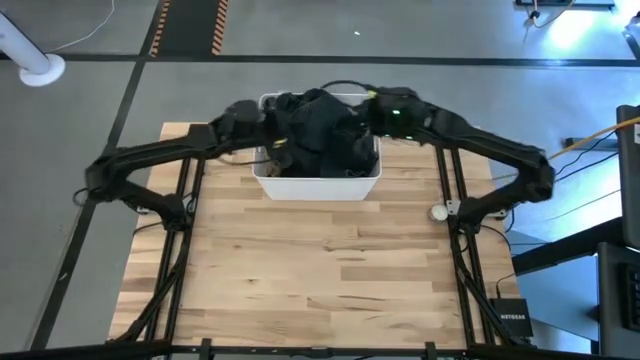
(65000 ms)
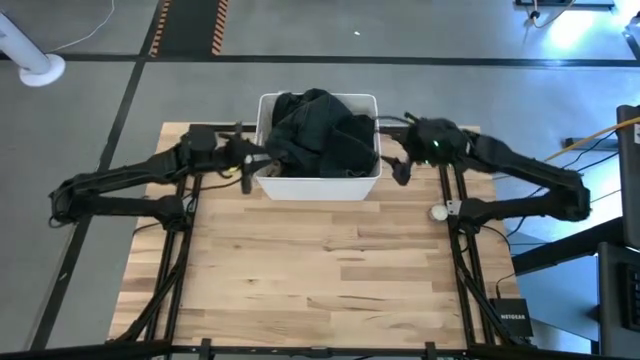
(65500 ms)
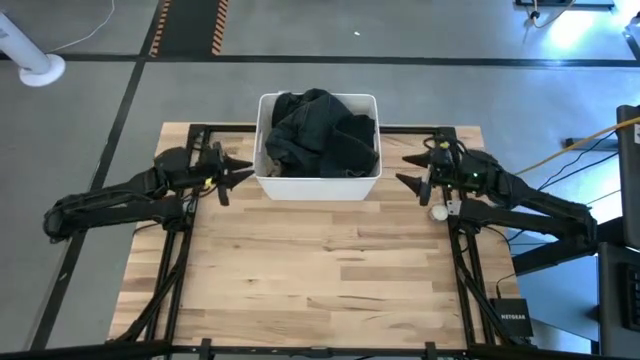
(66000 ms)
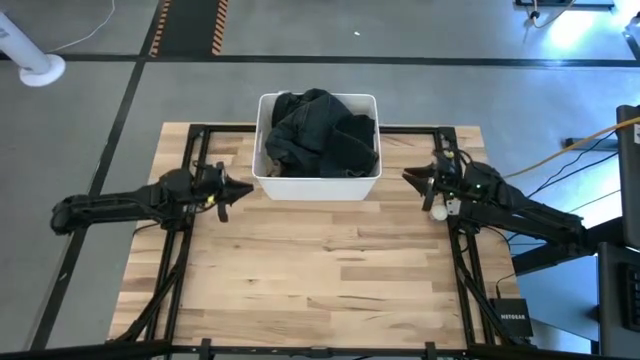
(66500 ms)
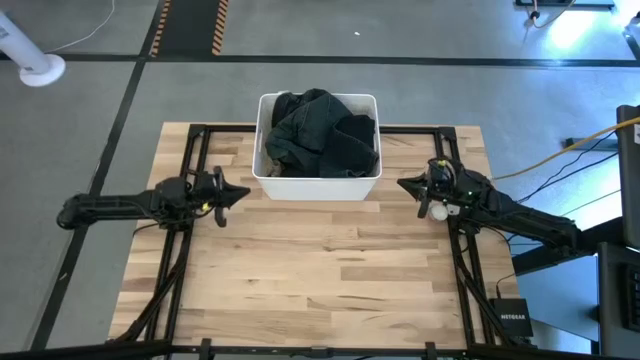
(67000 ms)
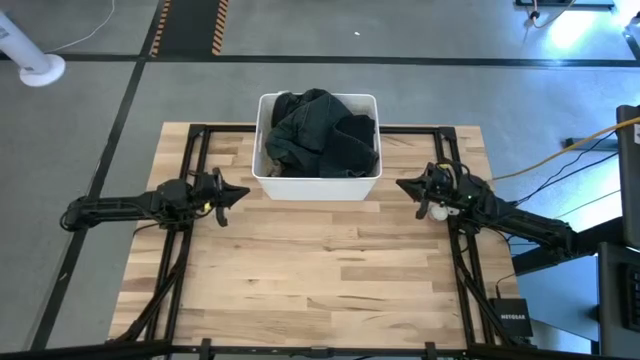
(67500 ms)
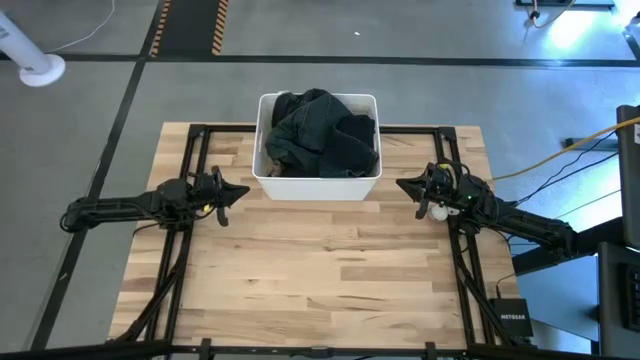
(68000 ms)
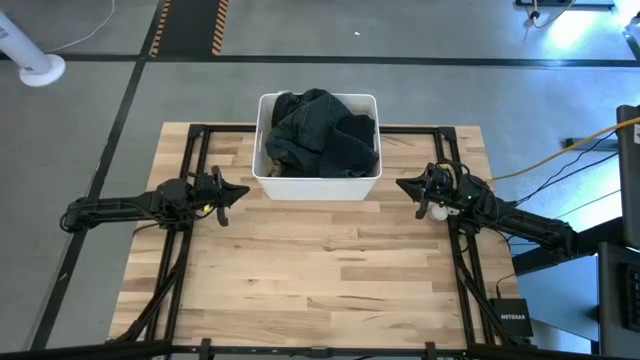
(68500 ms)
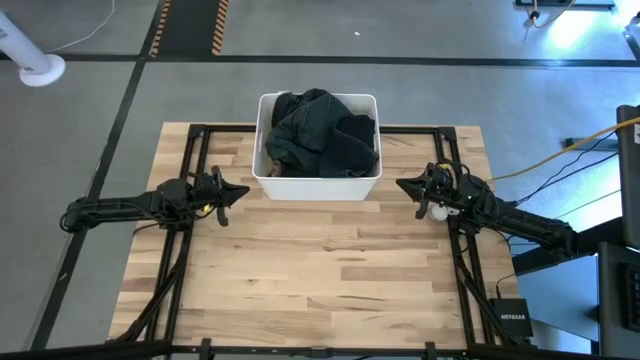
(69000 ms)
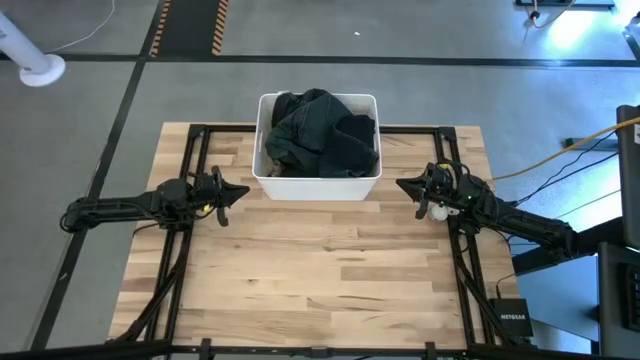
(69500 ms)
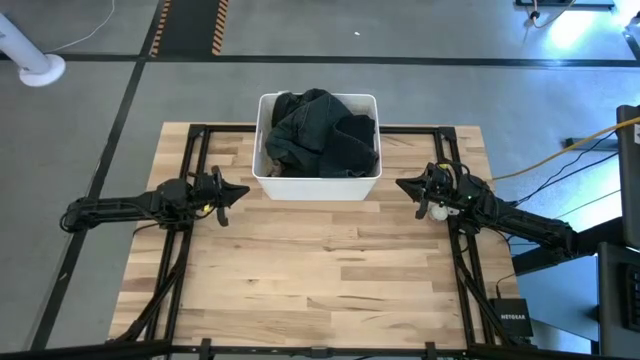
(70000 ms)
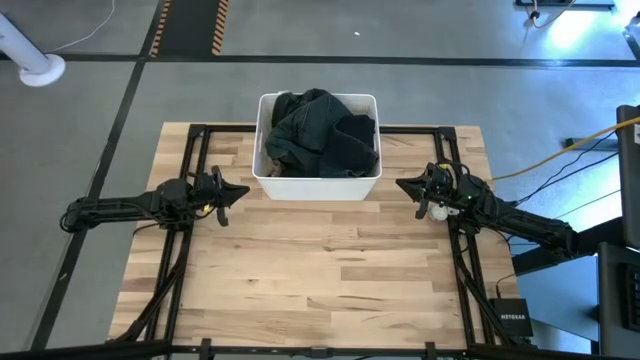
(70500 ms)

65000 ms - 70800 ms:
Task: Sort clothes
Return to Home Position

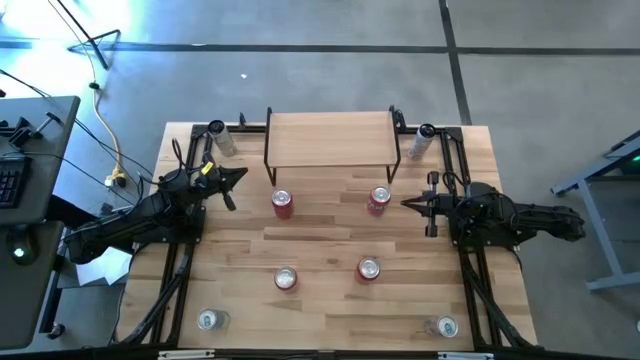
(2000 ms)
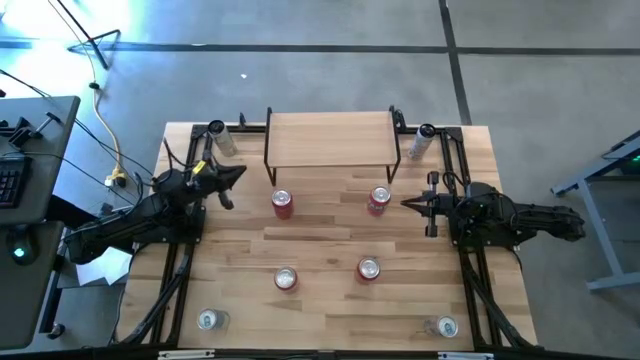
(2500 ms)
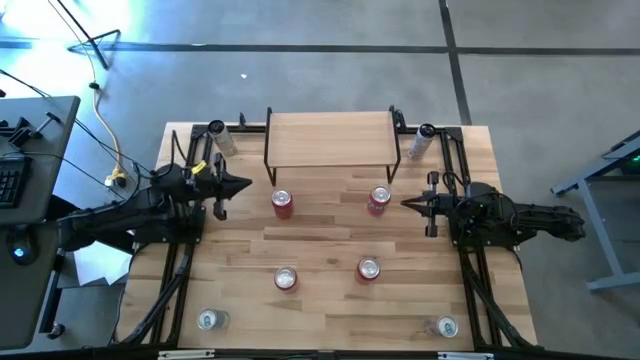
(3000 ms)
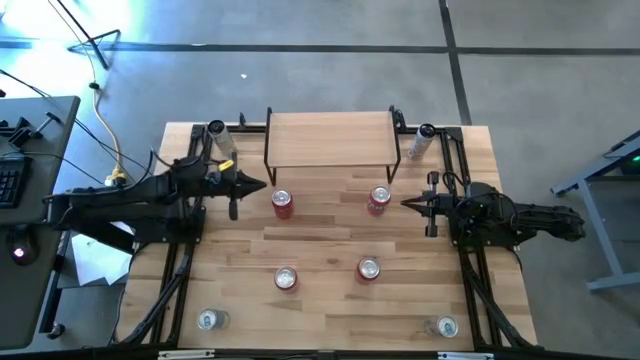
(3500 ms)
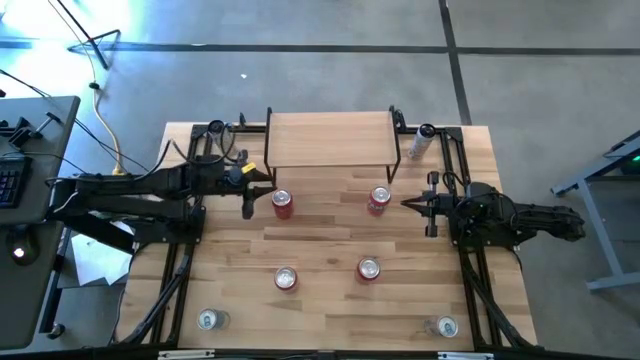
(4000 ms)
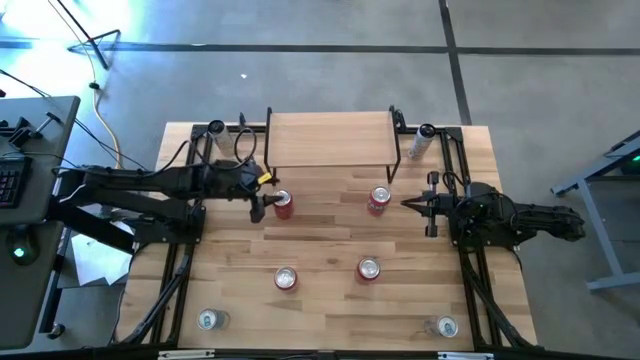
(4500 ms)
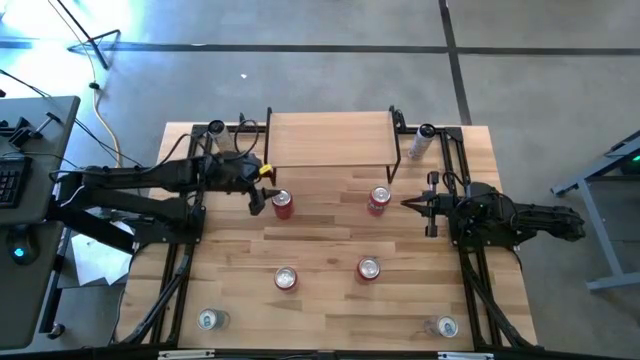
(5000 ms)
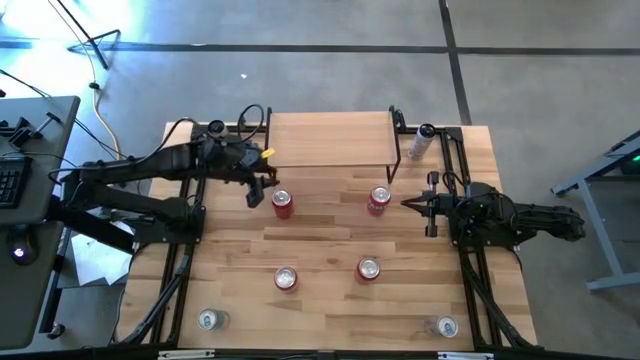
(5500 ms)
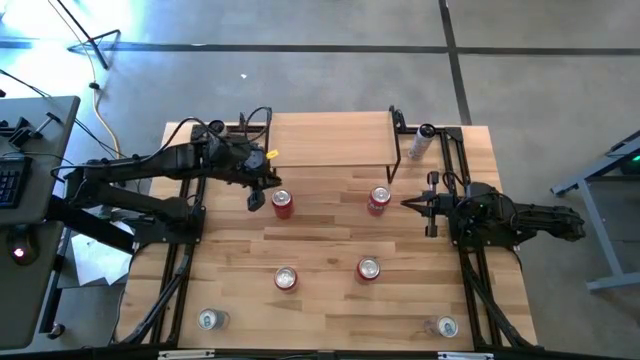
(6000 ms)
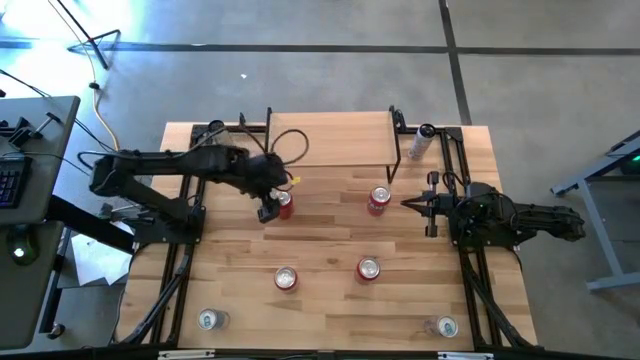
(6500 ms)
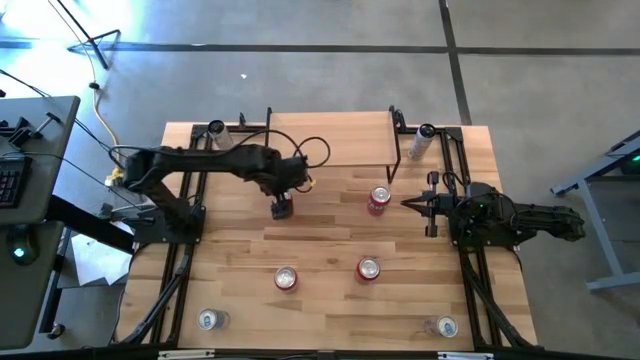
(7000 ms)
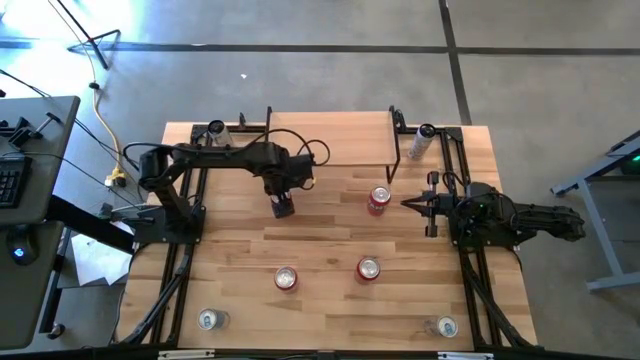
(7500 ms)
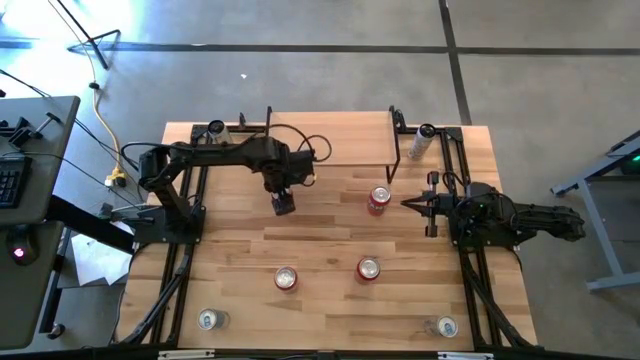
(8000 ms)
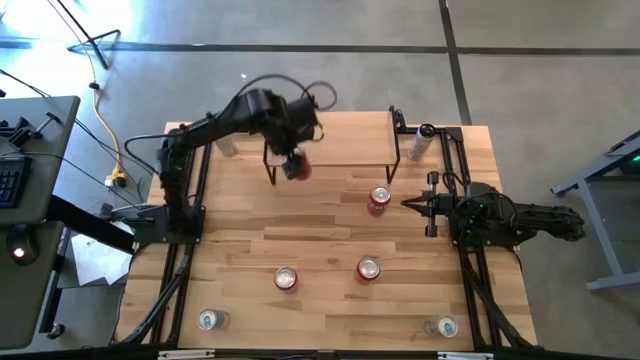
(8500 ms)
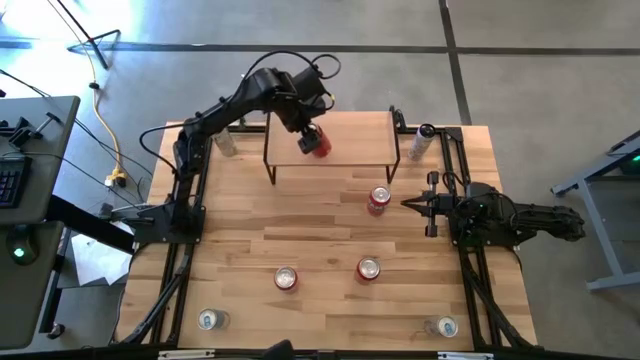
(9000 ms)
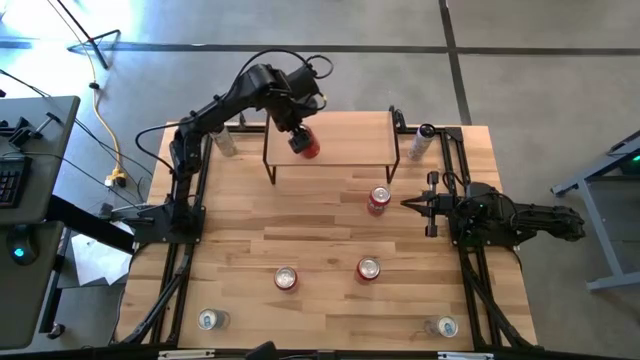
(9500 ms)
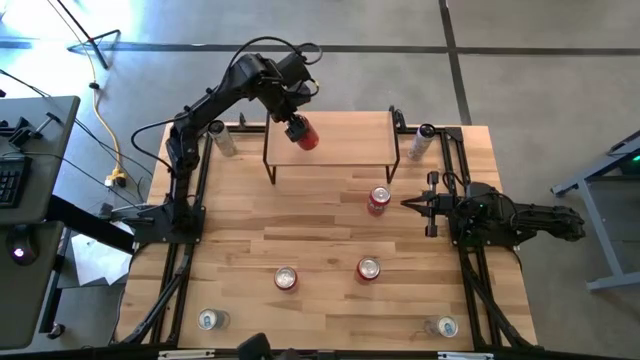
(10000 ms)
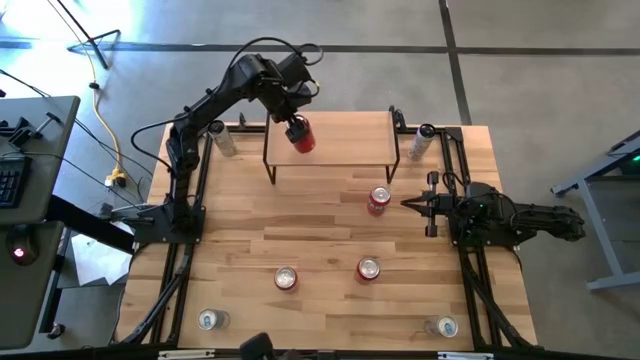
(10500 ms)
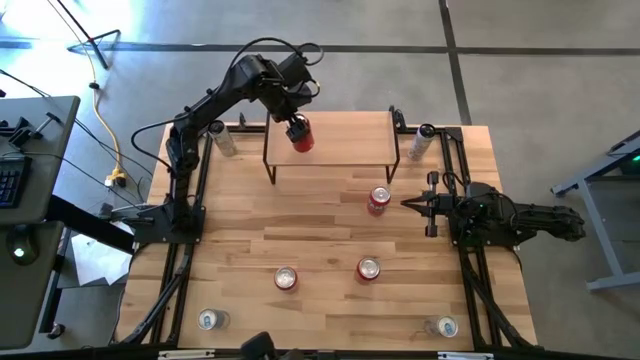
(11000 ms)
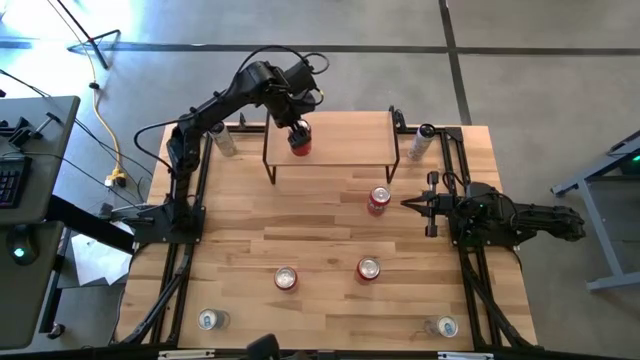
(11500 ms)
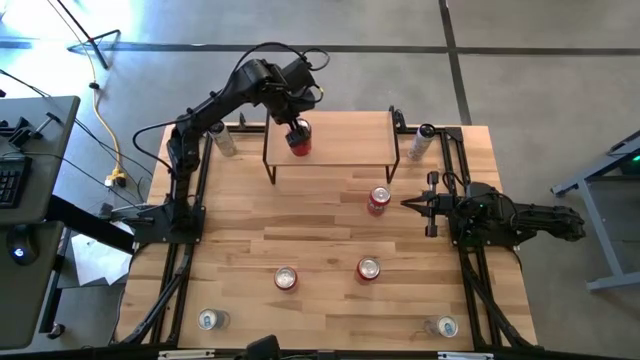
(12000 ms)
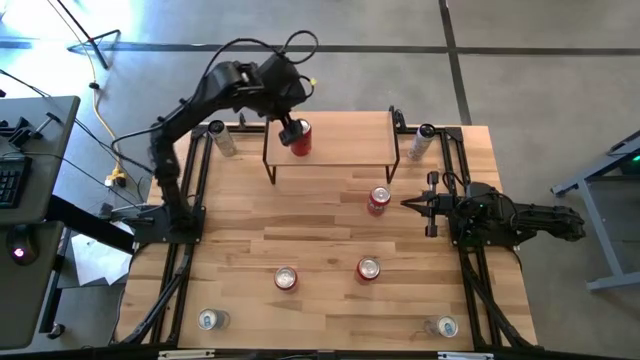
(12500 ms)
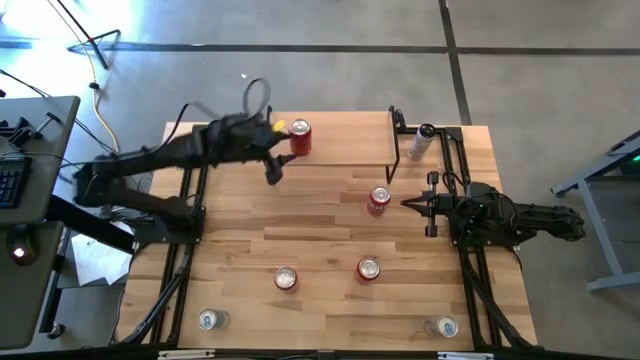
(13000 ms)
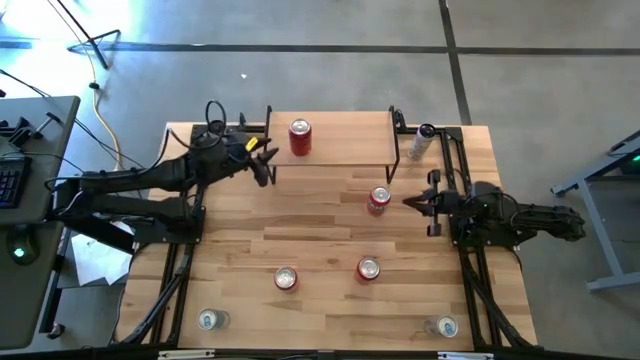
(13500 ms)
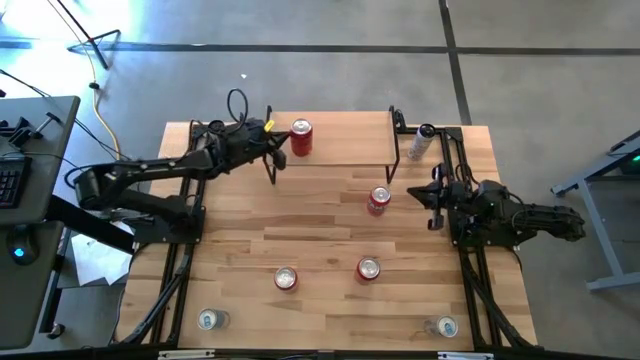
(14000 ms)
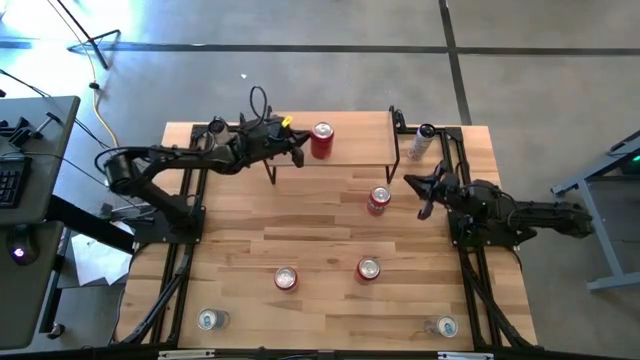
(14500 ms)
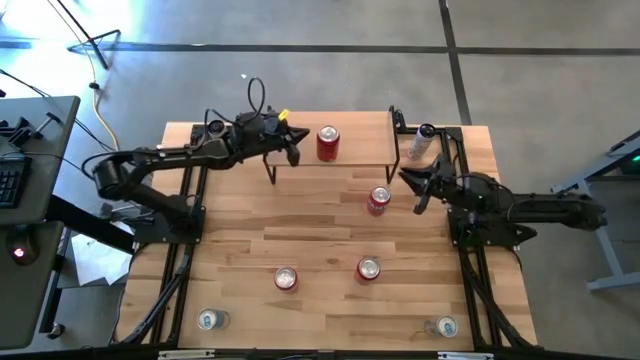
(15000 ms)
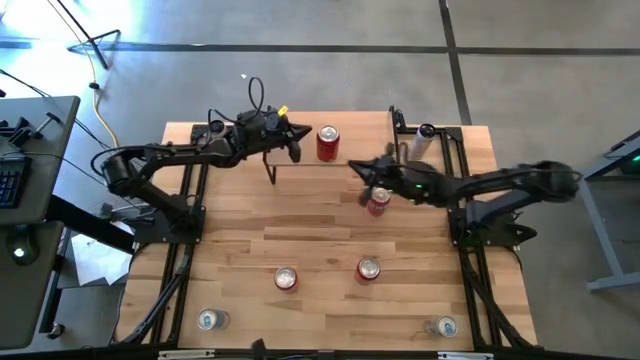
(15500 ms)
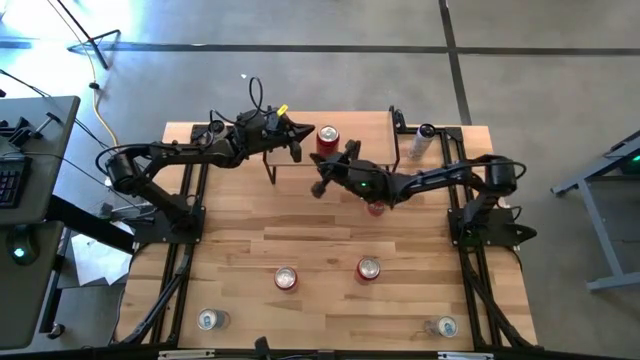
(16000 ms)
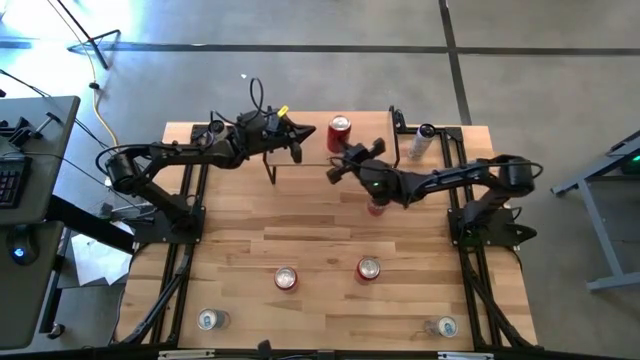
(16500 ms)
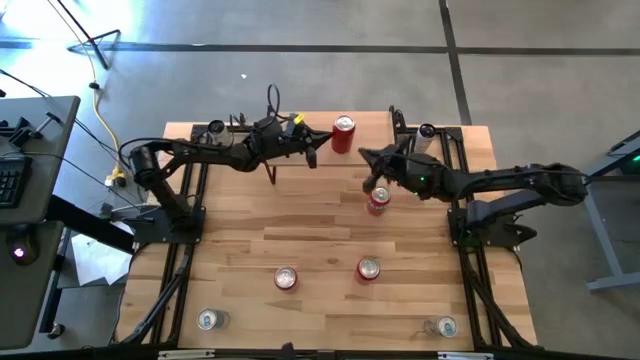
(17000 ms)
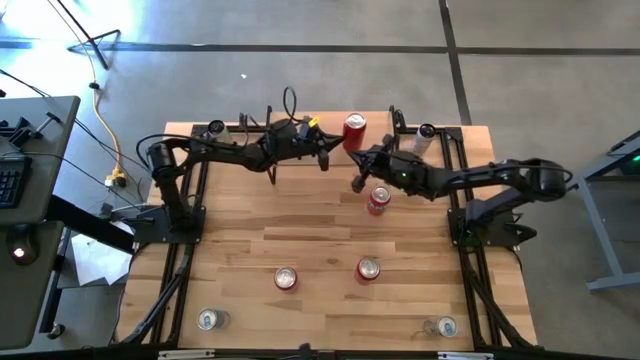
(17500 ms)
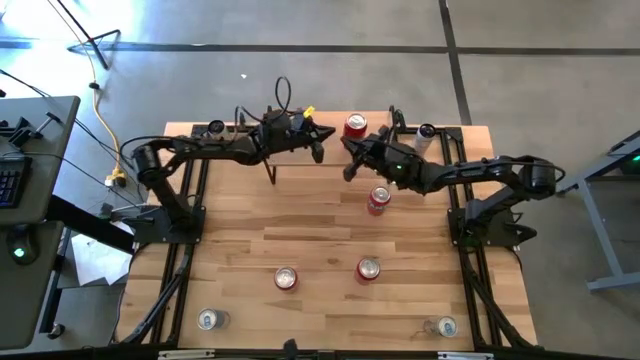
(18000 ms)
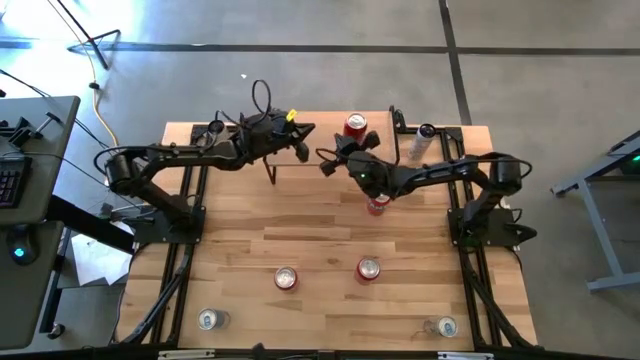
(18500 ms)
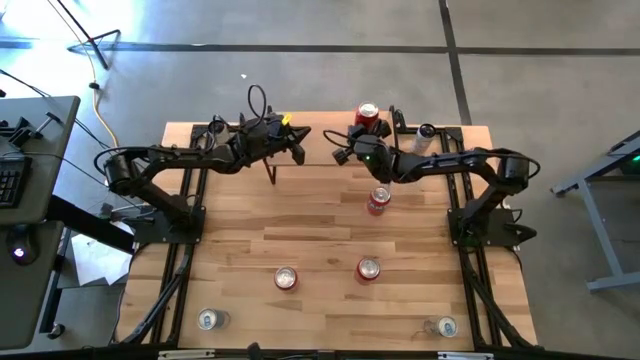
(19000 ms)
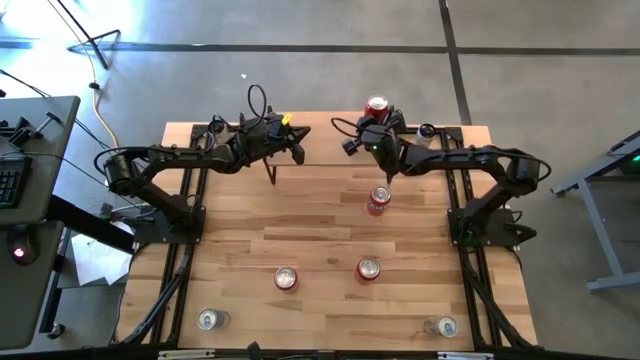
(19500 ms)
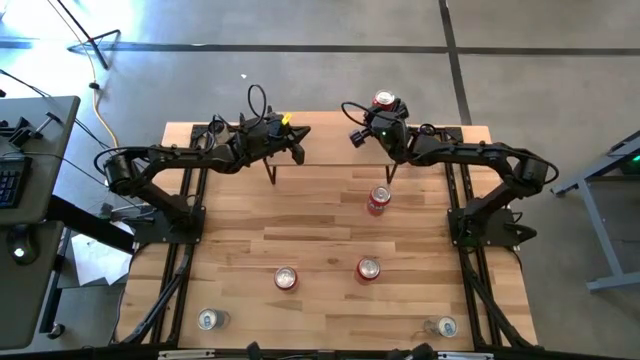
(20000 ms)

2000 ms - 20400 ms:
Task: Place canned beverage on shelf
Put the top red and black soda can on the shelf
